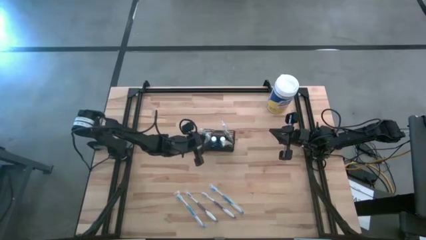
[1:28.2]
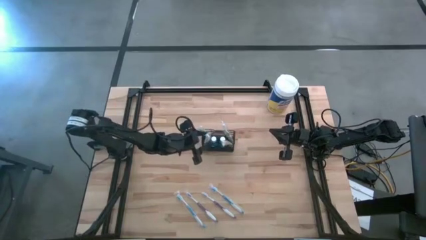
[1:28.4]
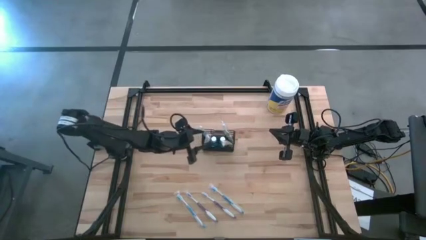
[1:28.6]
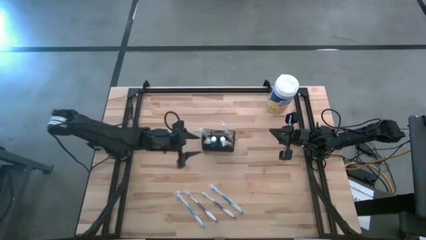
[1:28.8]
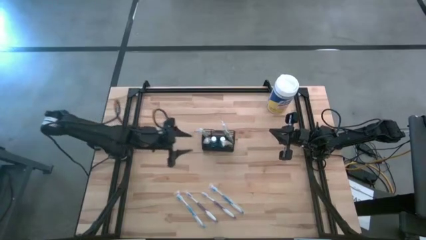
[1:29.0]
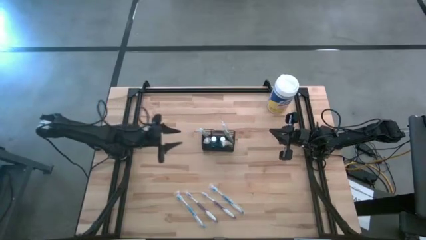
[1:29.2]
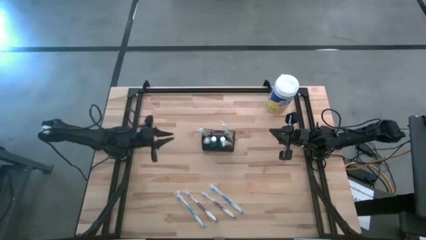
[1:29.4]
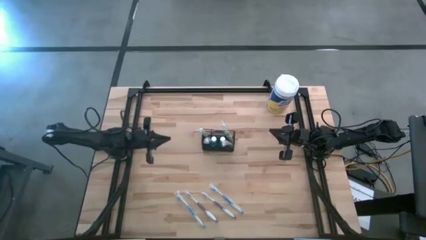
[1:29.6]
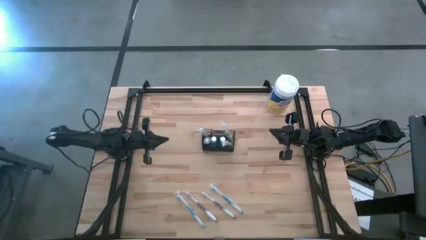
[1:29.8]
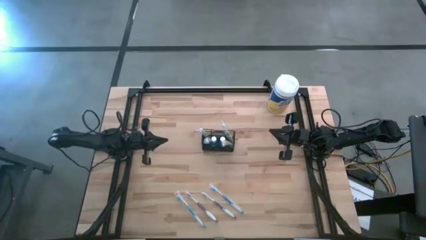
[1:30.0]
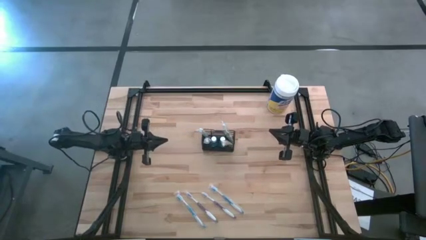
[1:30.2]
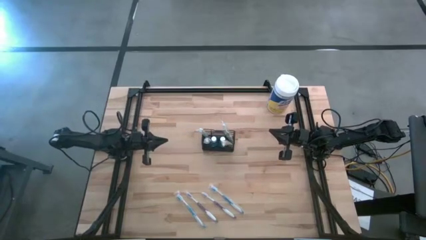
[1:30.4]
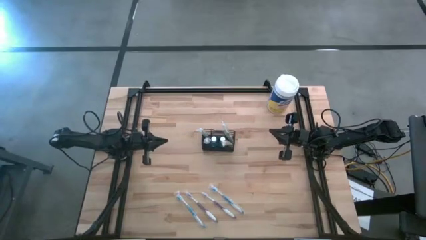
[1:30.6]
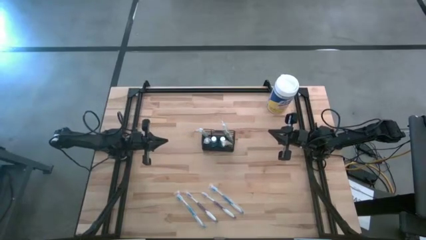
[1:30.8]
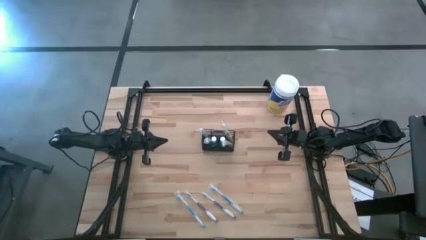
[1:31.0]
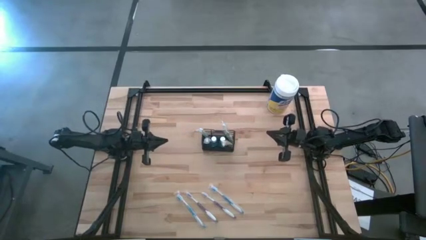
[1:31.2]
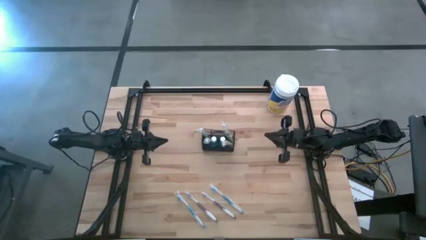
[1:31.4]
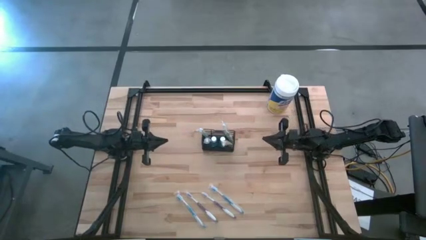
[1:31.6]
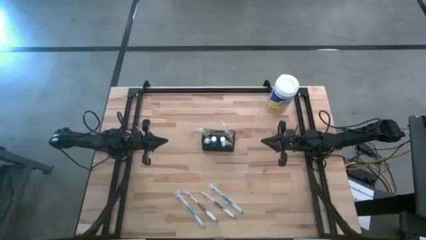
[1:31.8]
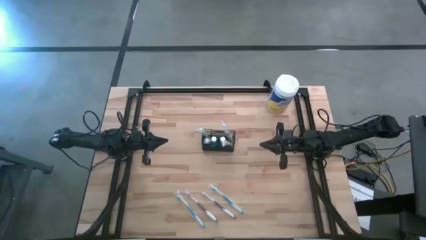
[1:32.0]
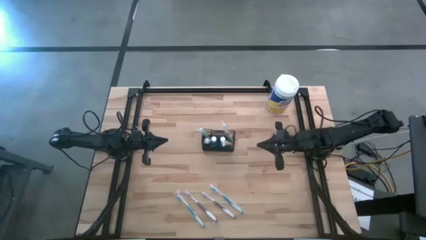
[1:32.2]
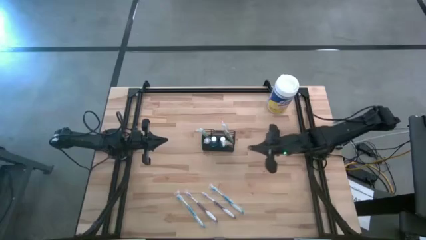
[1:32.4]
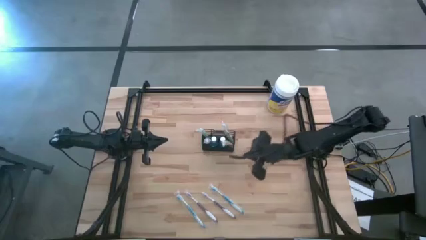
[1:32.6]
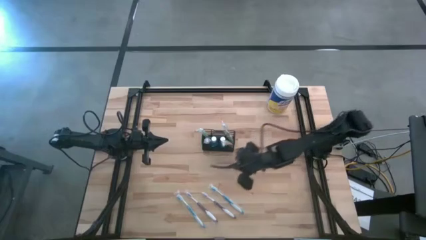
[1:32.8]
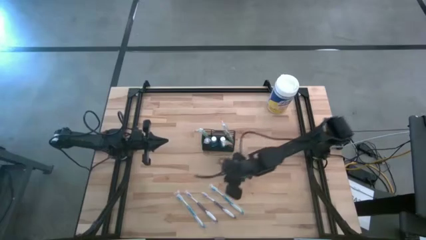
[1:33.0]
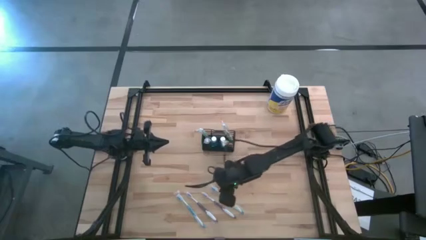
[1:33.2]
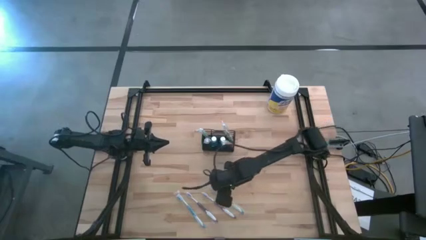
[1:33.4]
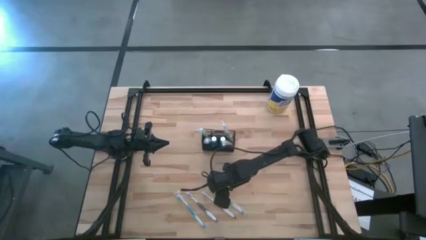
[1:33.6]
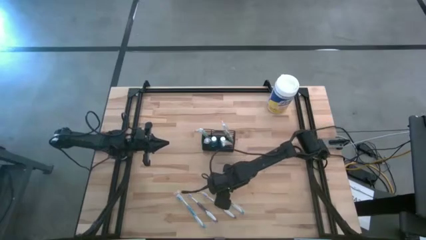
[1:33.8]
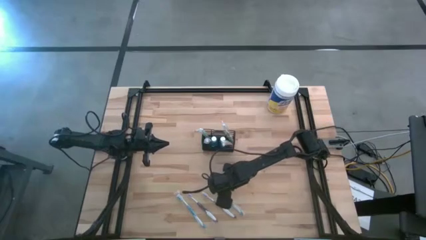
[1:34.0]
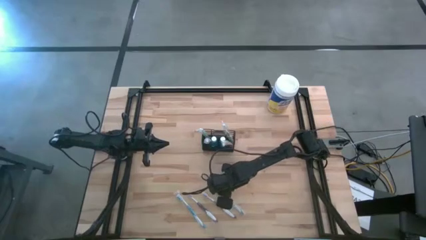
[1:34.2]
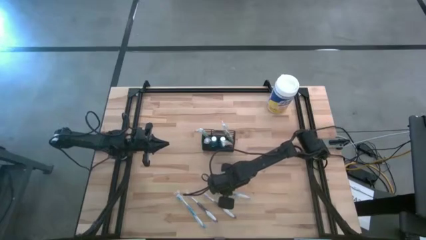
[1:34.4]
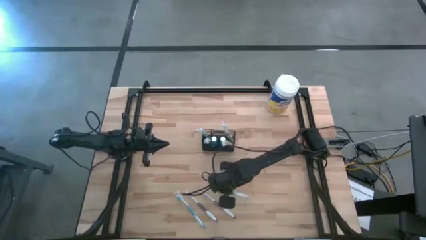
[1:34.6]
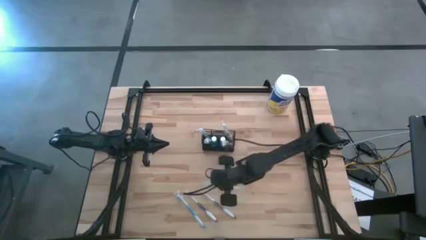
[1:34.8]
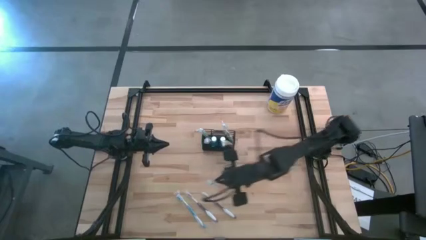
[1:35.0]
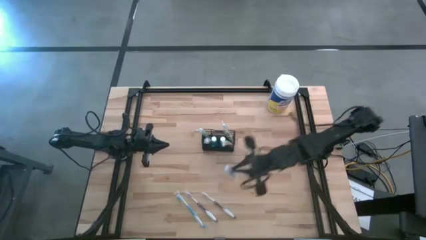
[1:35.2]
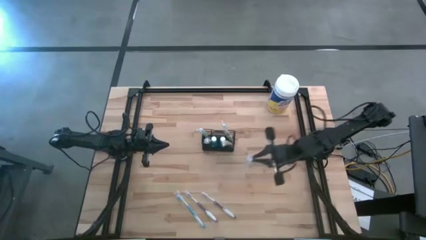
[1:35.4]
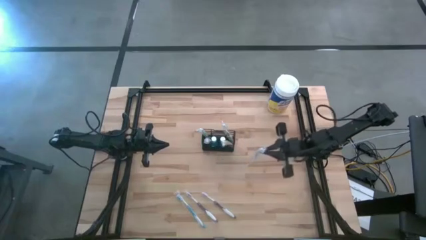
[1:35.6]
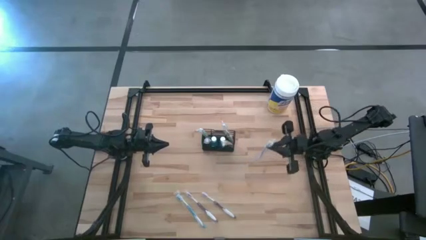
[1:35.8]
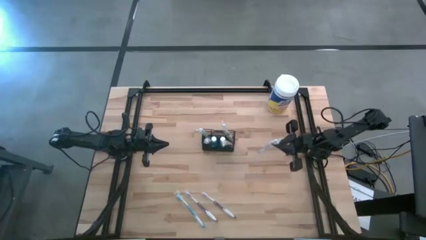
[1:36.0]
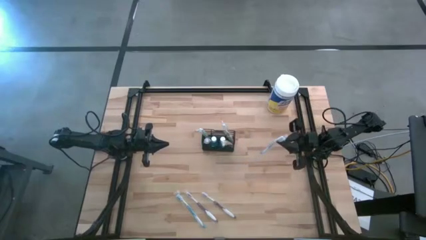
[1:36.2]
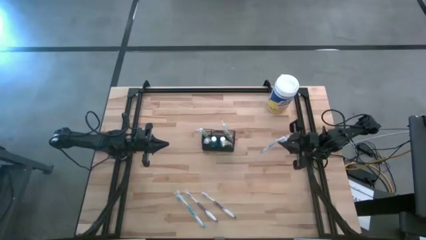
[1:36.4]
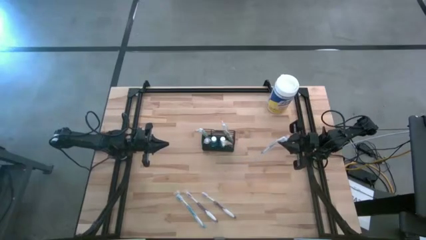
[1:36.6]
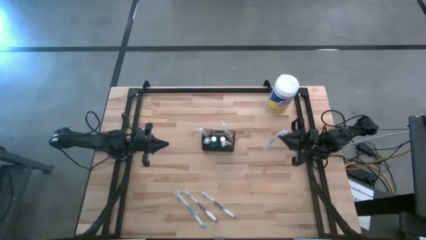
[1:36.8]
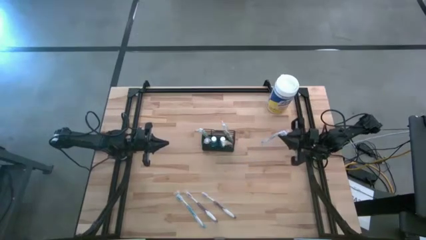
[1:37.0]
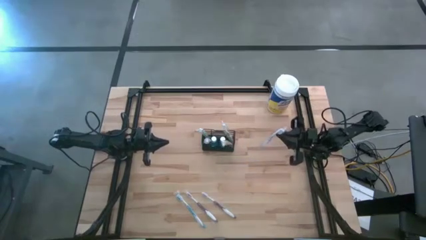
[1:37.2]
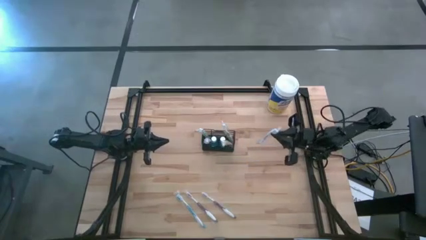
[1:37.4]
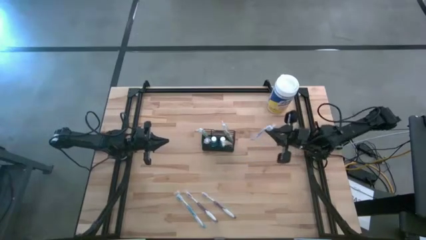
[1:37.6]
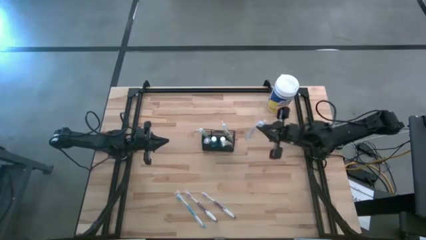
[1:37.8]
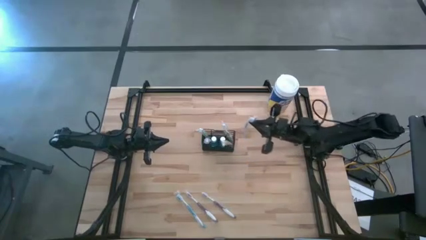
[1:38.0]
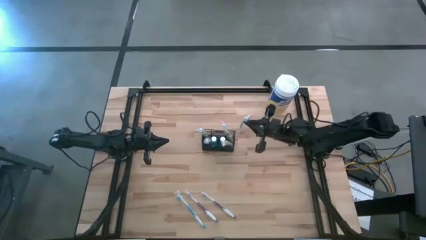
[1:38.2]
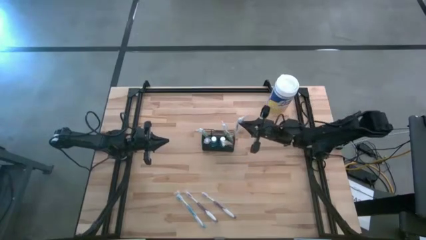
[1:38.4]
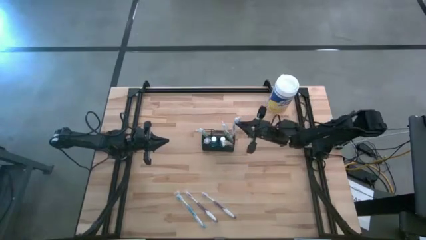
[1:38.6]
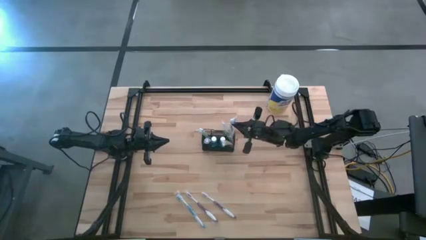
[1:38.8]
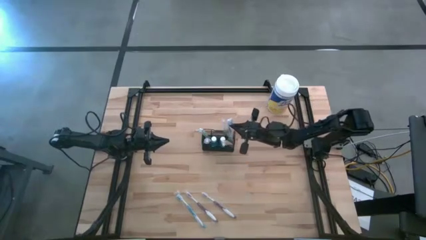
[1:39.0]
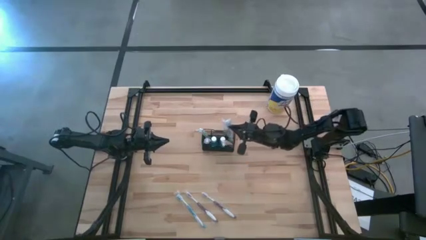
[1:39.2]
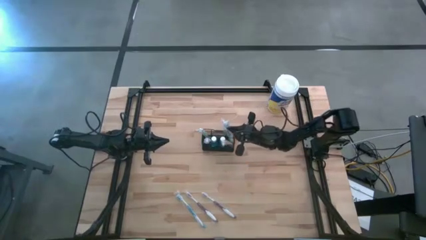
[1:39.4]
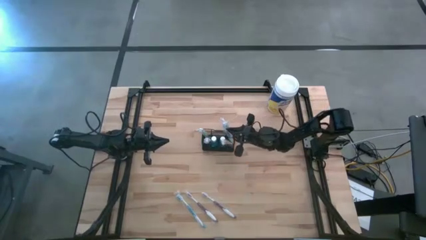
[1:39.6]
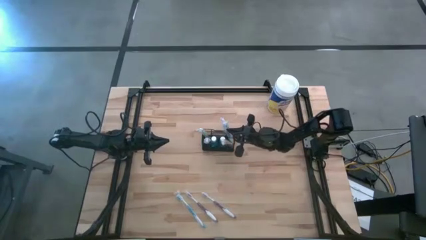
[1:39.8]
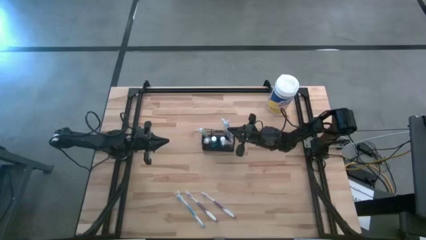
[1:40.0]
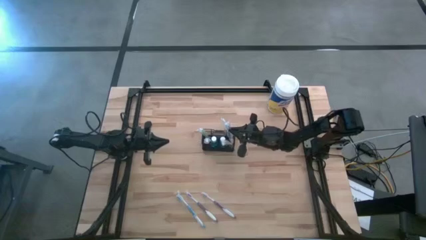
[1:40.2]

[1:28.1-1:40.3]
Task: Pick & Place toothbrushing station
Put the right blue toothbrush into the wire organizer

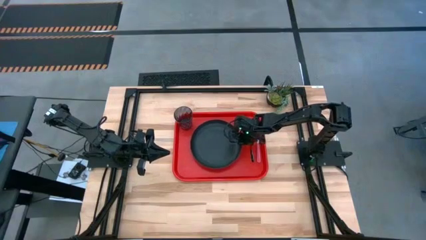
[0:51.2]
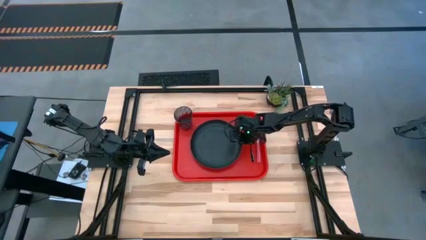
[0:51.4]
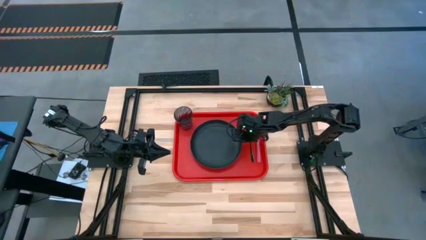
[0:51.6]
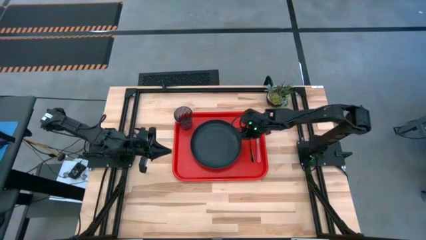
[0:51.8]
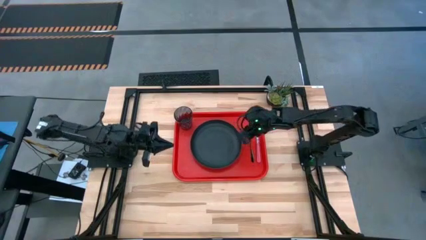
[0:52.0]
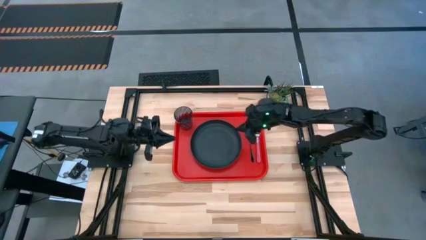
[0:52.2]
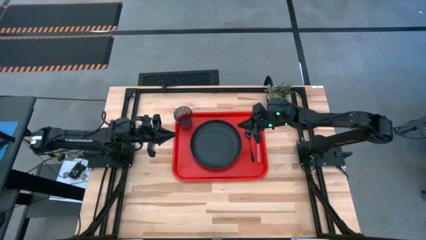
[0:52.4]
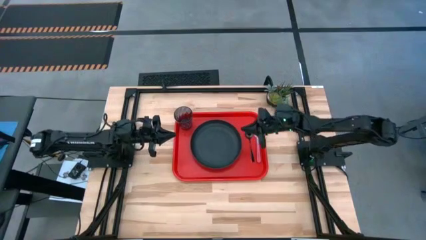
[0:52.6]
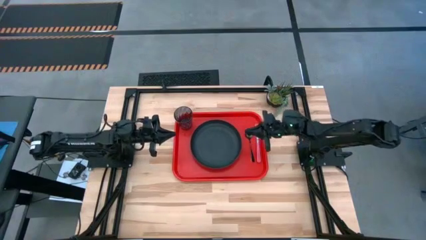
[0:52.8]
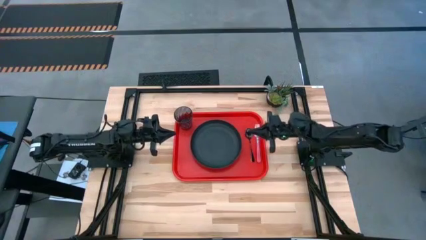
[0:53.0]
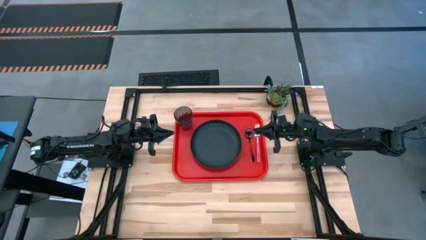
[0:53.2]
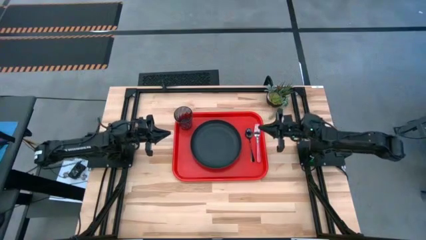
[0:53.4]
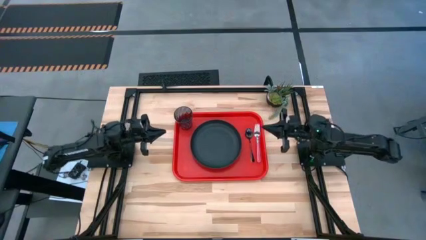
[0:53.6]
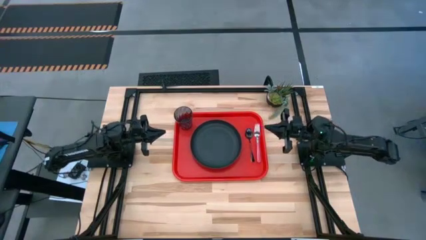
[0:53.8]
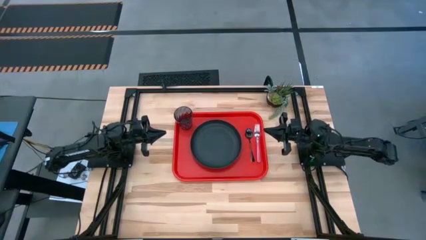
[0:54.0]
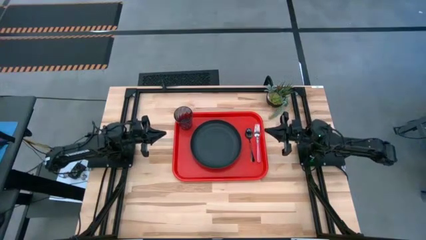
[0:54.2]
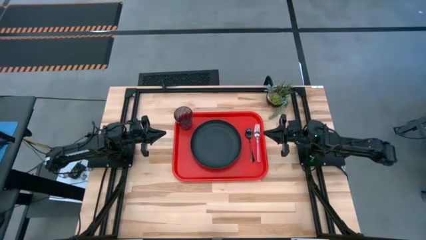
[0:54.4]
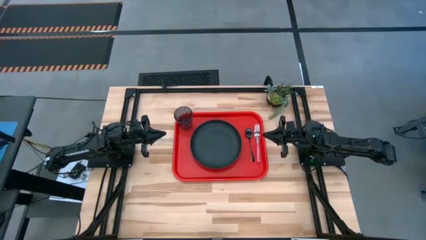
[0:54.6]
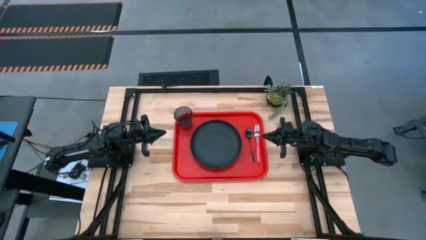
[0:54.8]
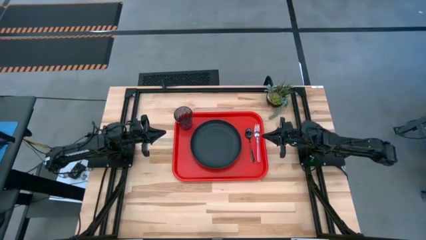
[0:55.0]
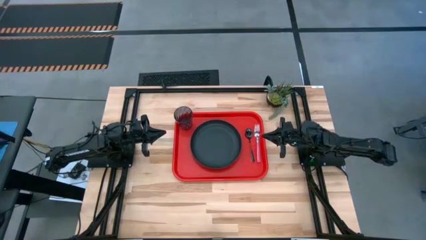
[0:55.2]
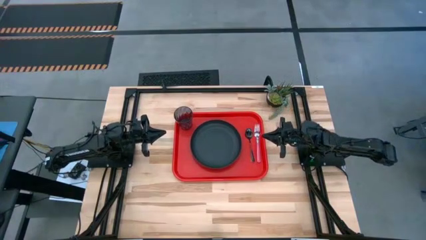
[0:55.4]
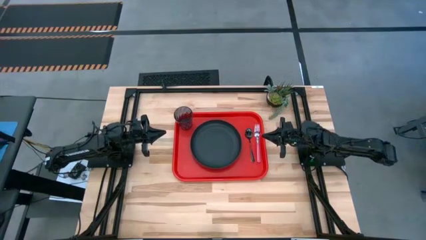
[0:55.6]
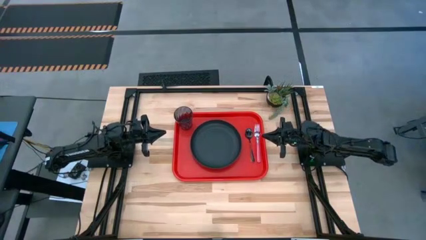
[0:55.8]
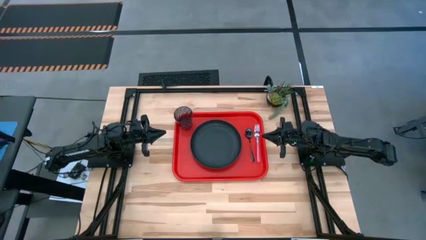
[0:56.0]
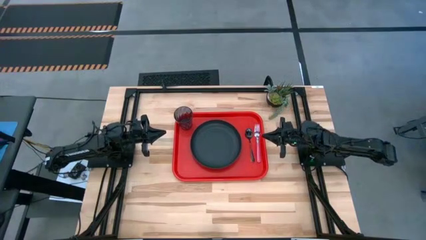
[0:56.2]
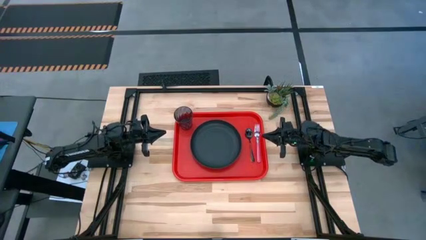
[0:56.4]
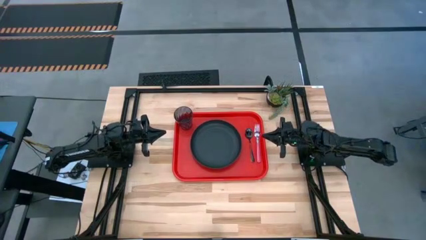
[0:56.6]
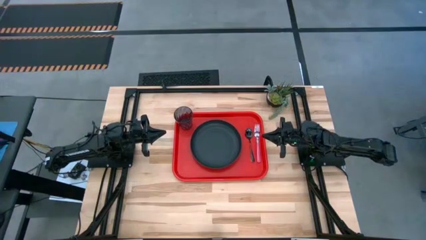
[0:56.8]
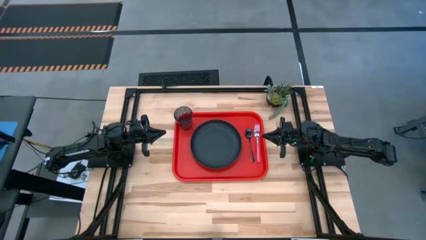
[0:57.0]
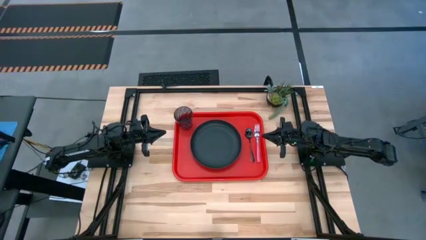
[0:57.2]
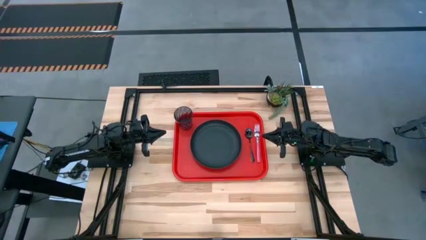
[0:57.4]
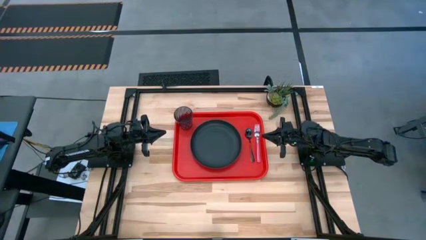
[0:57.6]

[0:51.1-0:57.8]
Task: Pick and place plate/cup/fork/spoon on tray
Return to home position
